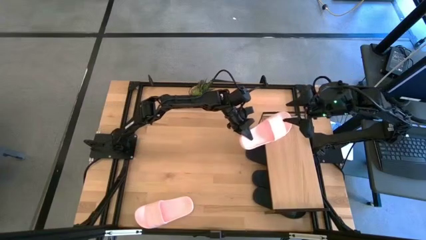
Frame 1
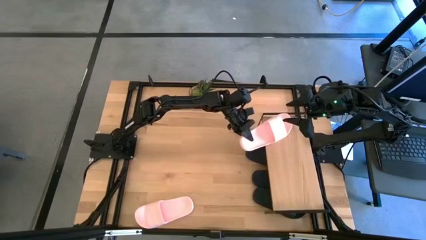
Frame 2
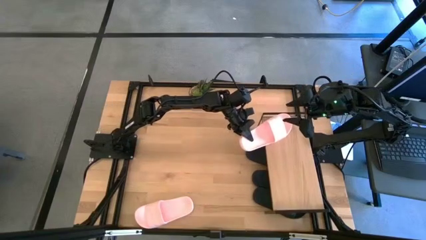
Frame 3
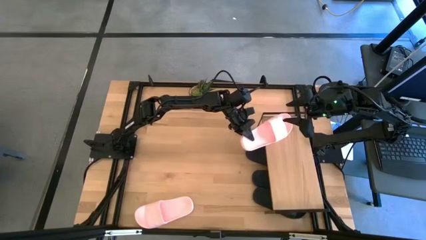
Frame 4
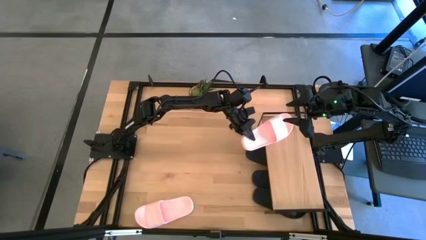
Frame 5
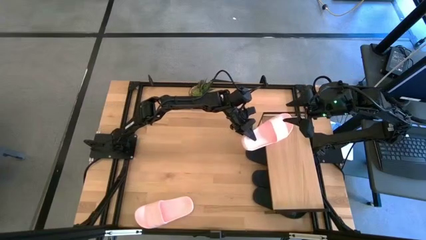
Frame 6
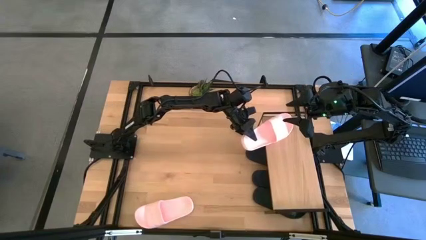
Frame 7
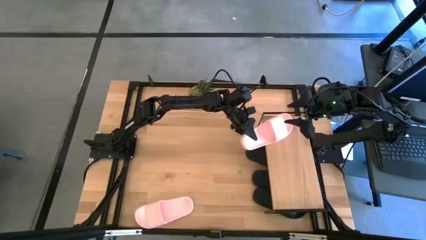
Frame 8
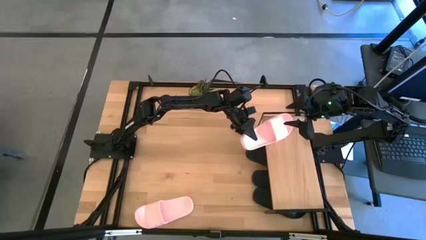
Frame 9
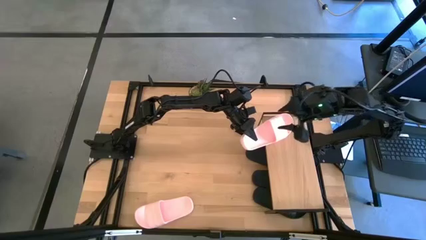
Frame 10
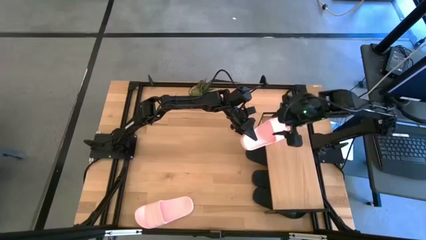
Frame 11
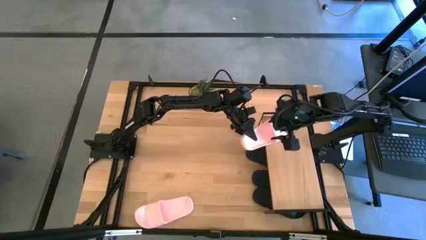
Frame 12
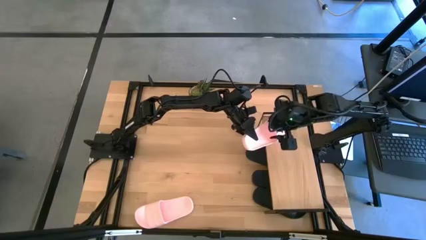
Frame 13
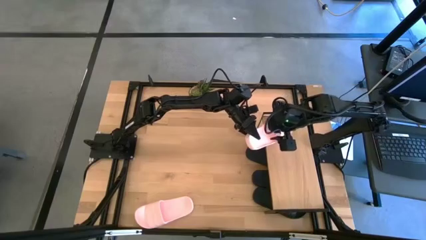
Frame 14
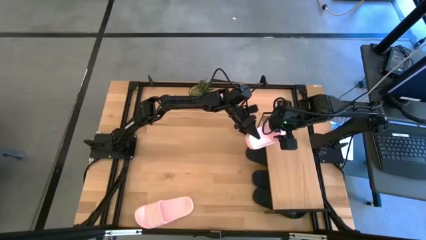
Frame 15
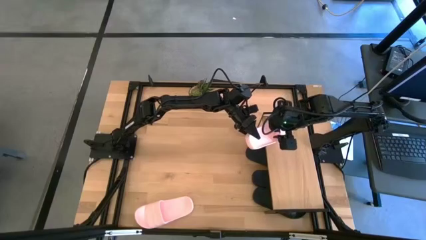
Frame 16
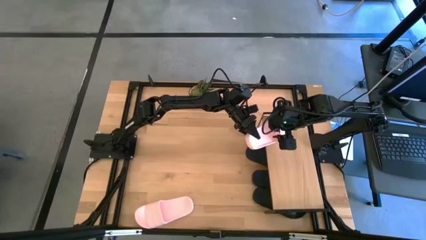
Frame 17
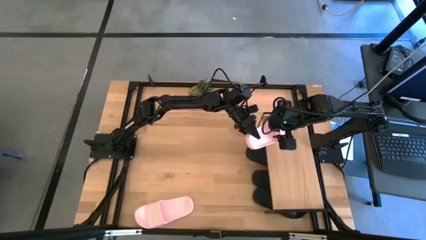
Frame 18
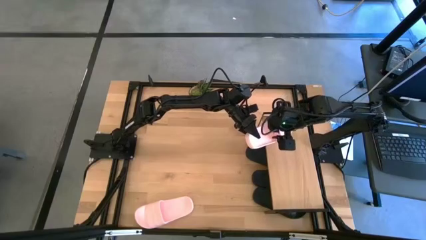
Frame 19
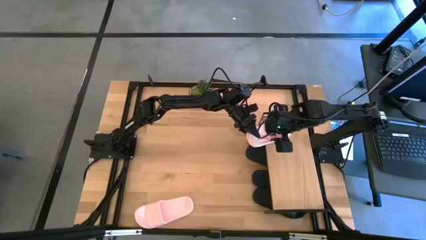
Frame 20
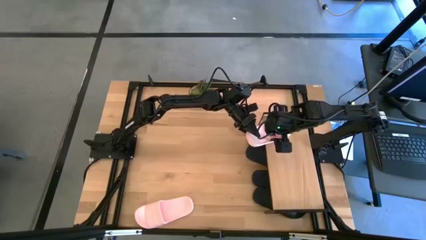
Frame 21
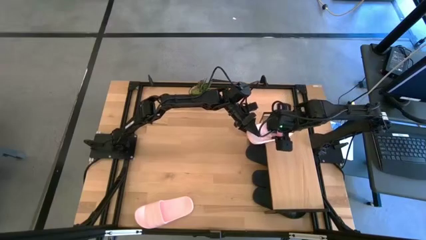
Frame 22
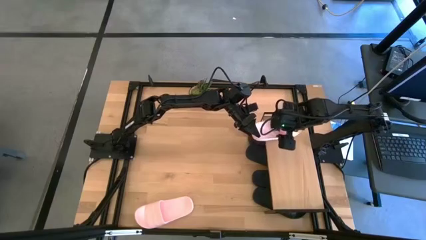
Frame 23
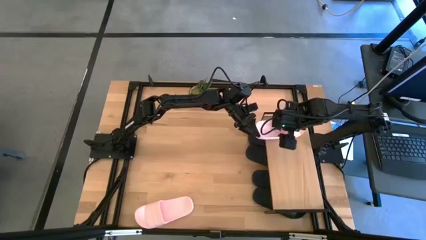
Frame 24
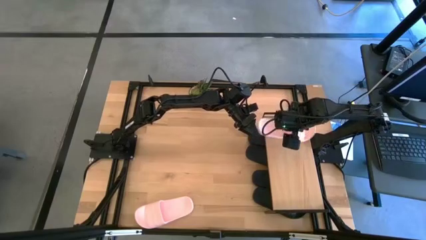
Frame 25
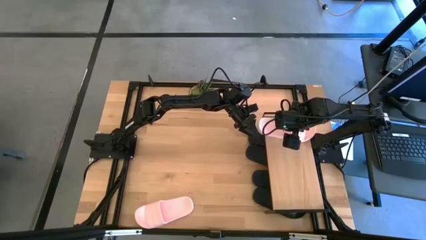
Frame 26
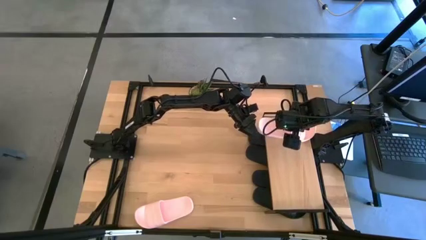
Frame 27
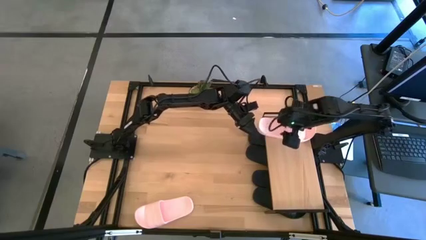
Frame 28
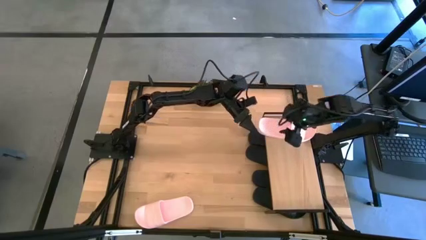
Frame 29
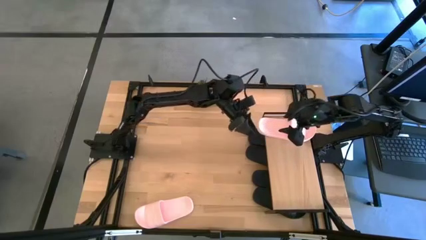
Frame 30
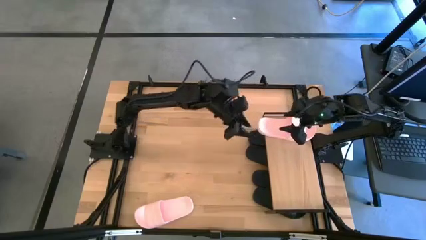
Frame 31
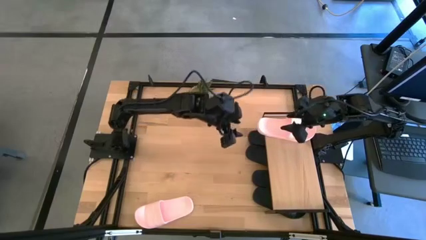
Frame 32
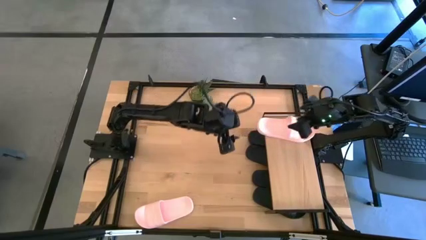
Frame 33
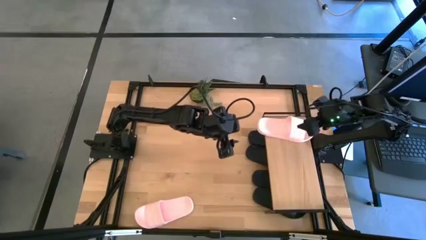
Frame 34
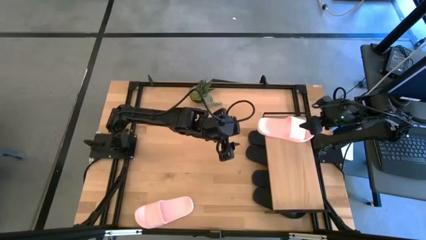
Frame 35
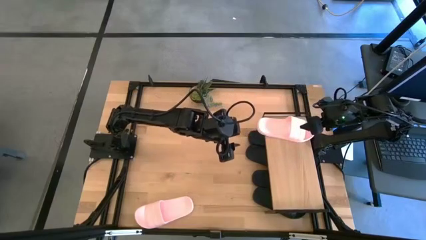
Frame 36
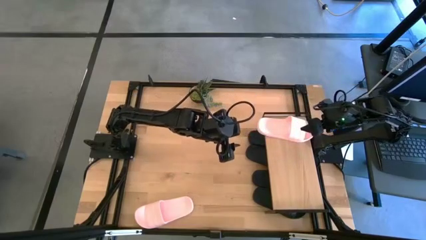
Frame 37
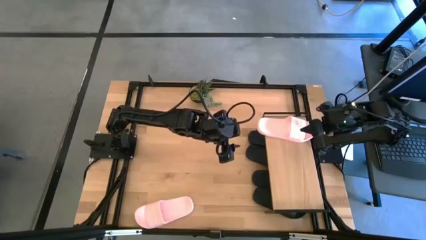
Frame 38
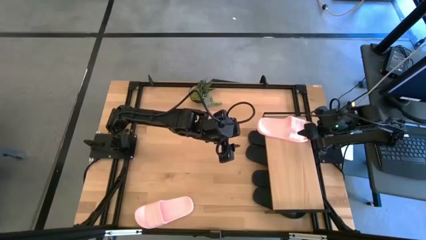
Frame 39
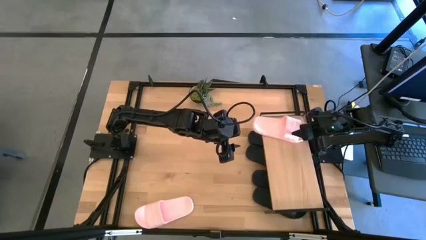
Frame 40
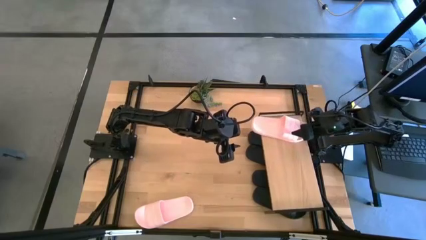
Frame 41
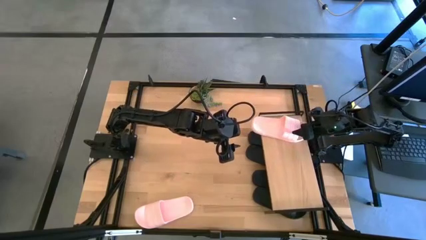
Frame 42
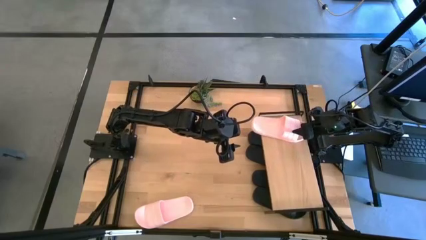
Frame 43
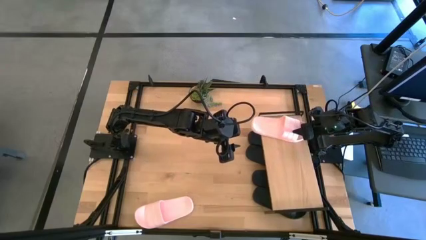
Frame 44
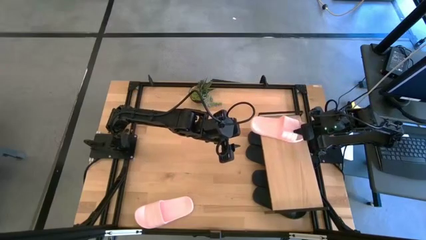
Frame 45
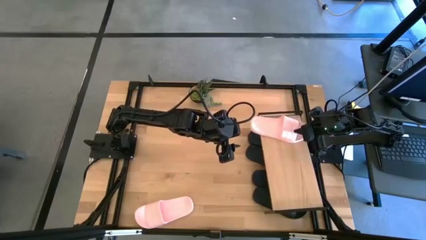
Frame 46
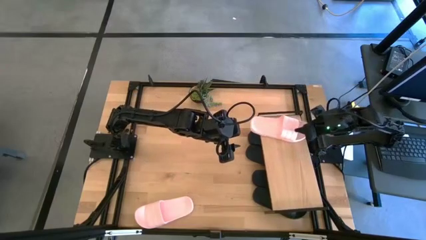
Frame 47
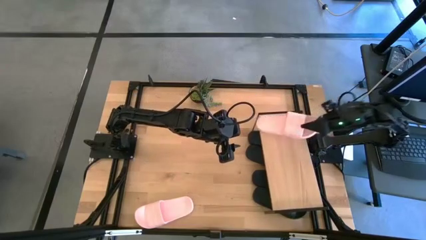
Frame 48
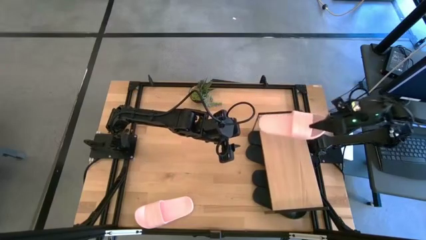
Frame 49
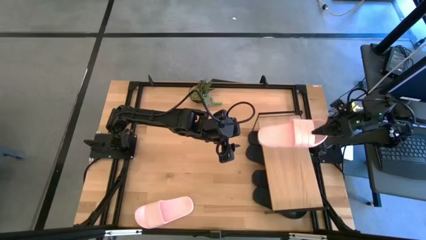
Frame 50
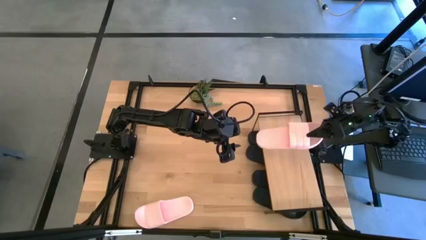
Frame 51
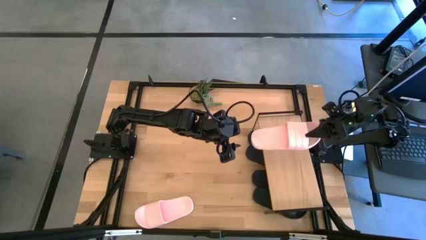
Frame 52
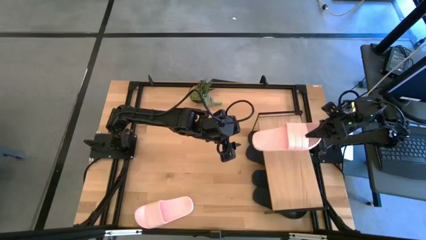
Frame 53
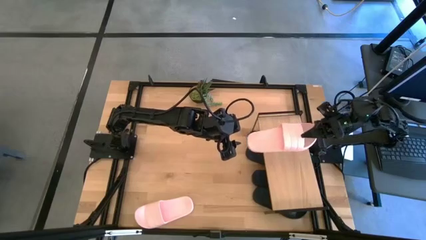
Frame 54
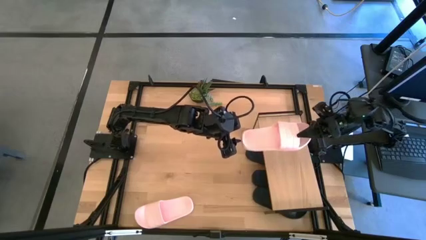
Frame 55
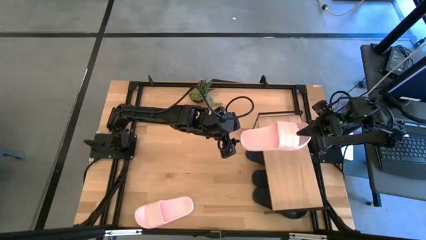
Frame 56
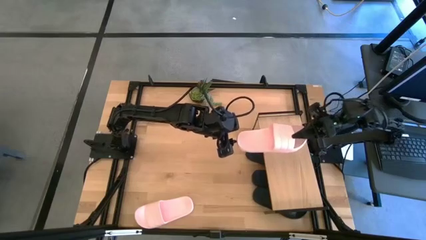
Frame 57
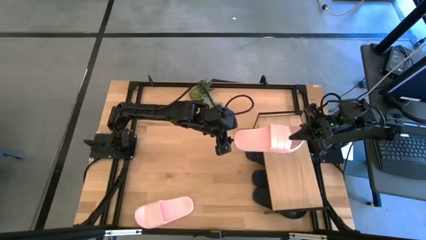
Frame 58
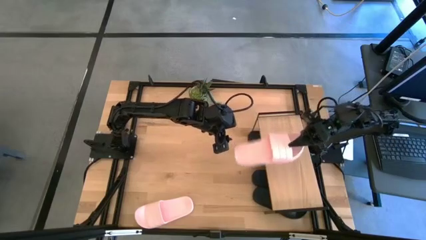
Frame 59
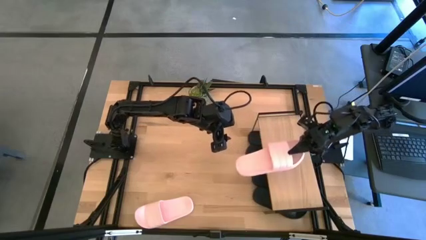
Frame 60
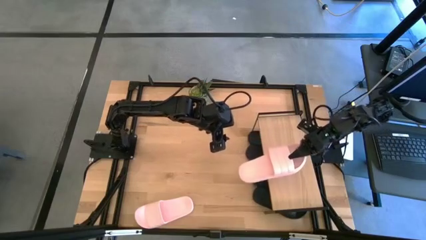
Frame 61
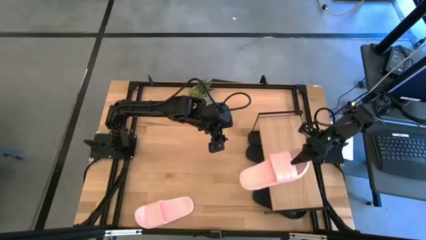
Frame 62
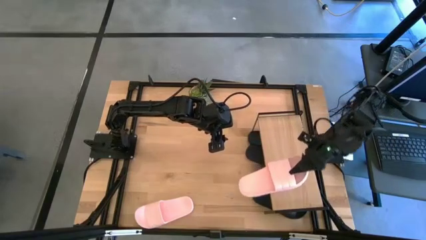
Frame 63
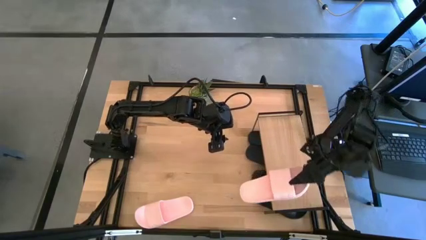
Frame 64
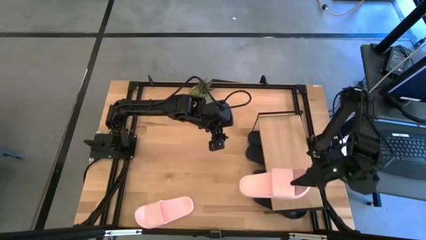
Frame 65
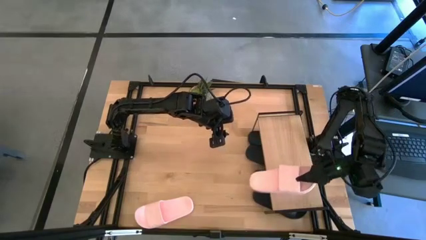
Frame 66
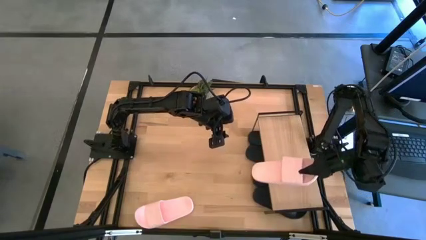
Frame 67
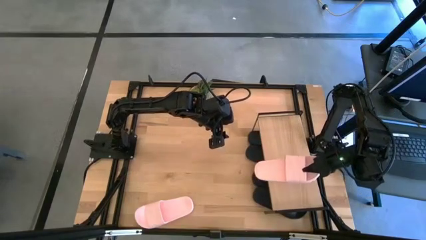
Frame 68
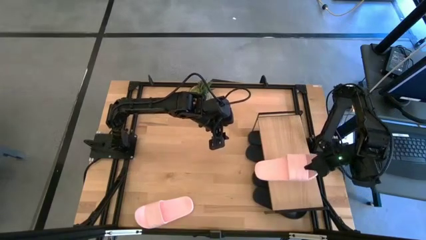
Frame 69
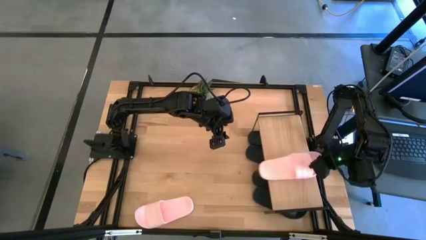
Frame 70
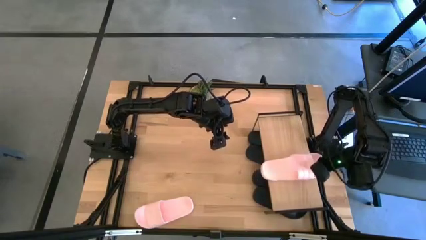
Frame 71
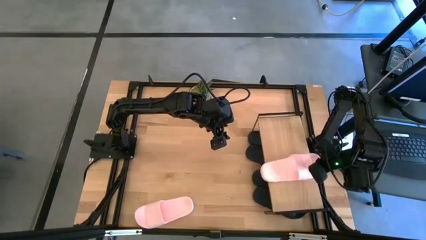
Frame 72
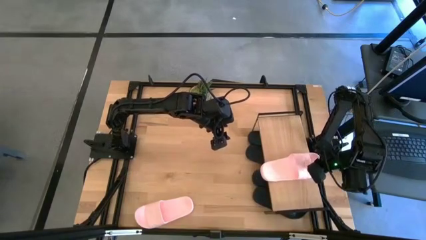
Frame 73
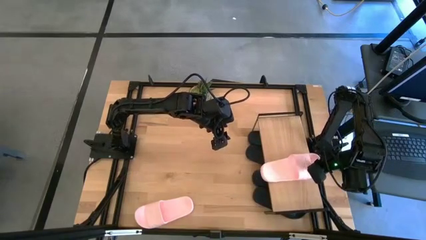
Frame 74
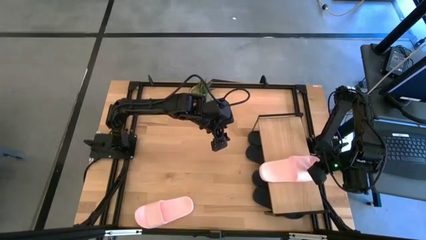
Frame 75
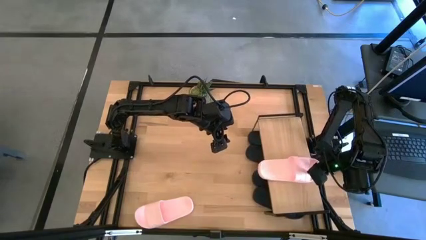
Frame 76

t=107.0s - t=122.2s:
Task: Pick and place slides into the shelf
Put the top pink slides on the shelf
